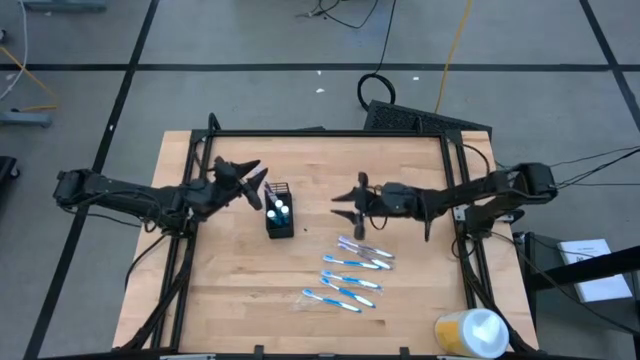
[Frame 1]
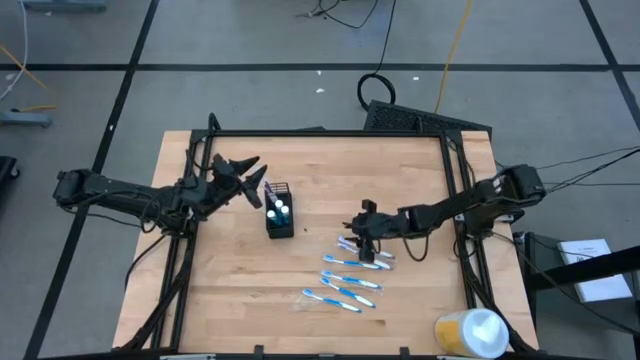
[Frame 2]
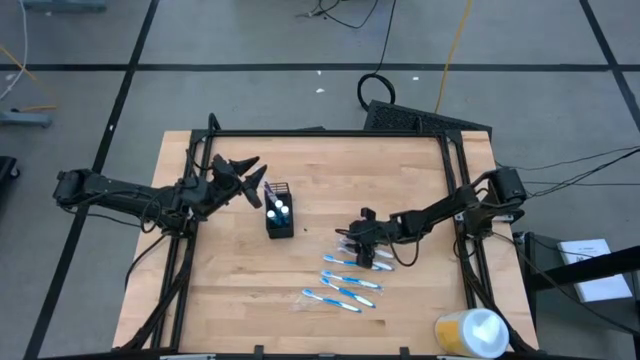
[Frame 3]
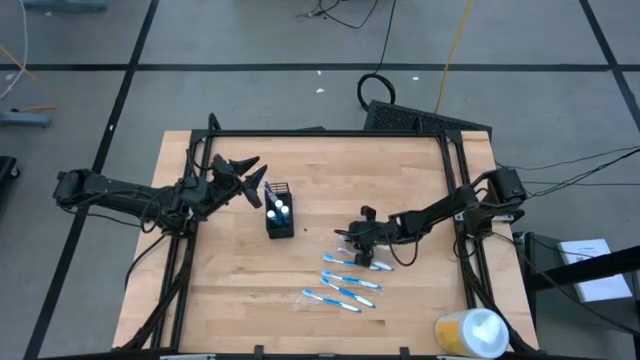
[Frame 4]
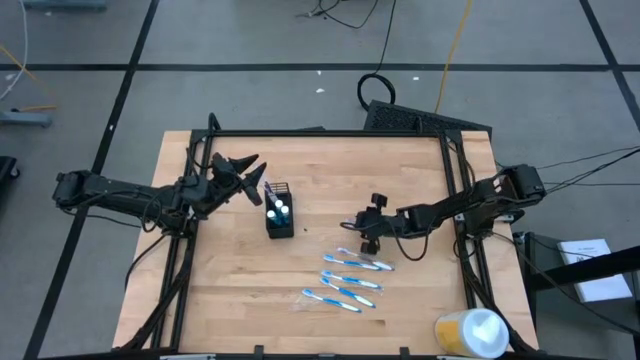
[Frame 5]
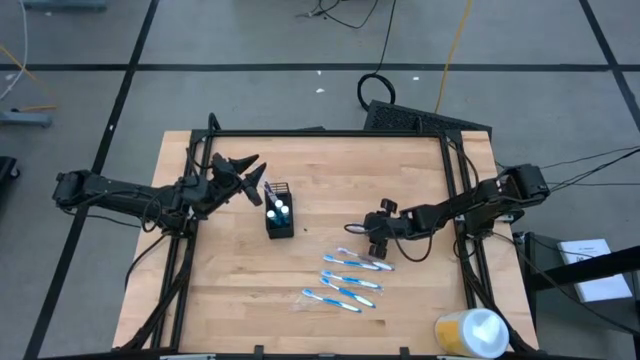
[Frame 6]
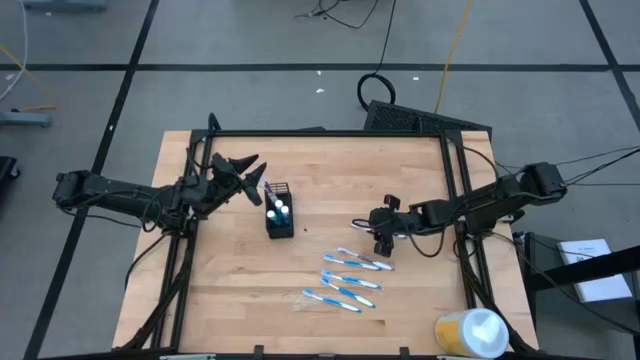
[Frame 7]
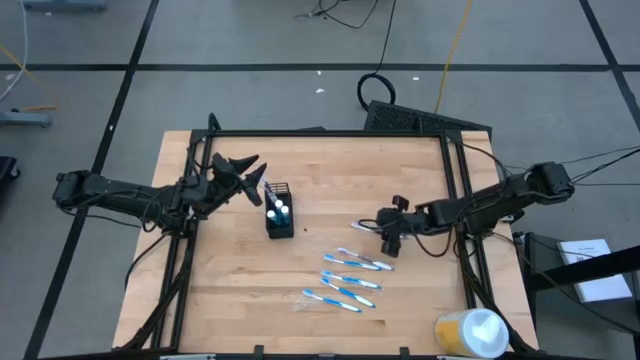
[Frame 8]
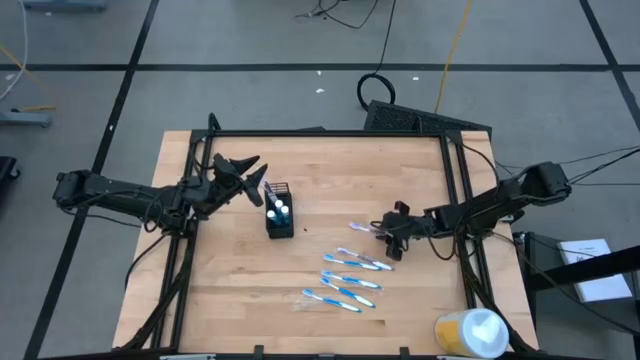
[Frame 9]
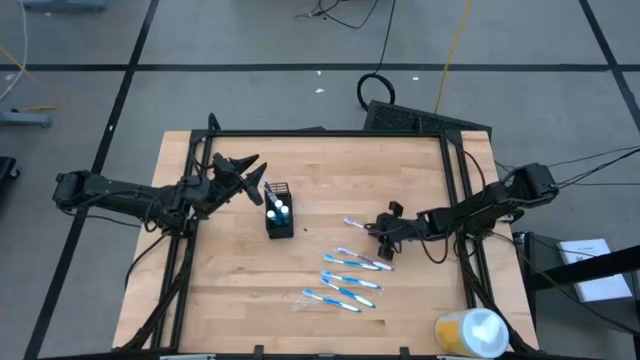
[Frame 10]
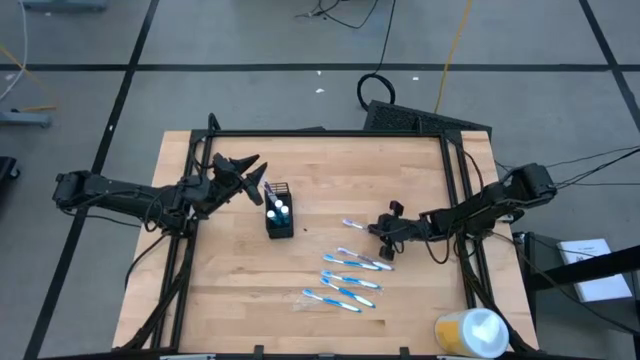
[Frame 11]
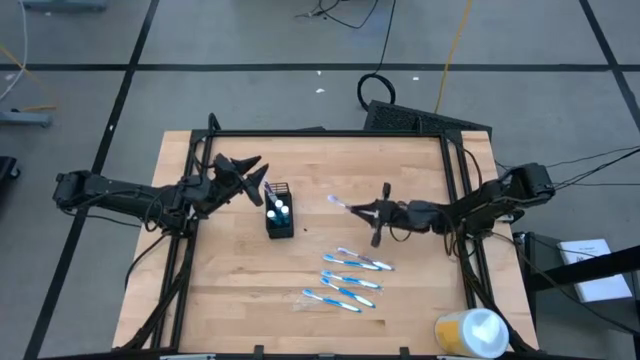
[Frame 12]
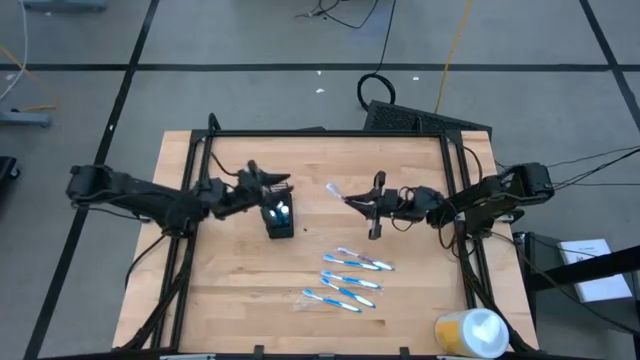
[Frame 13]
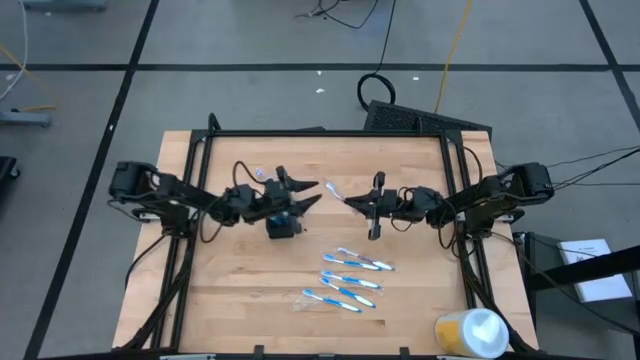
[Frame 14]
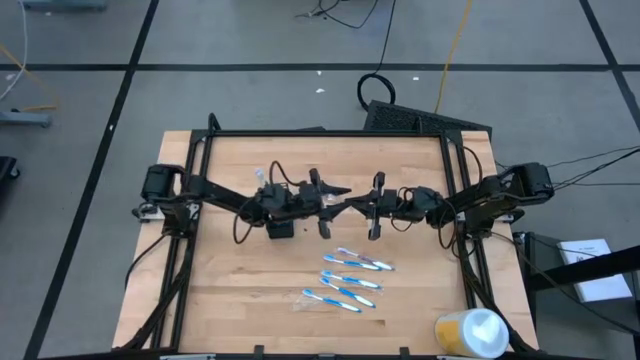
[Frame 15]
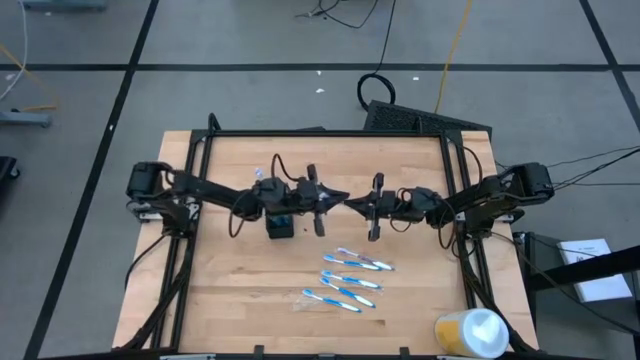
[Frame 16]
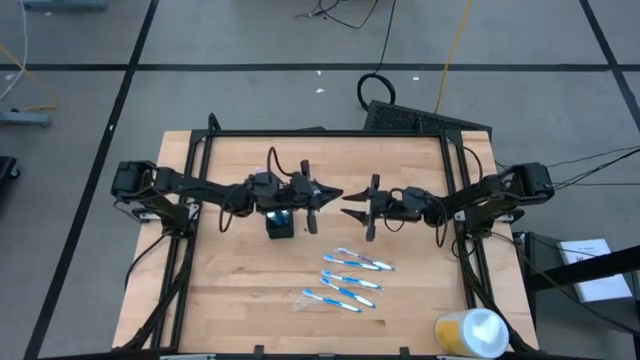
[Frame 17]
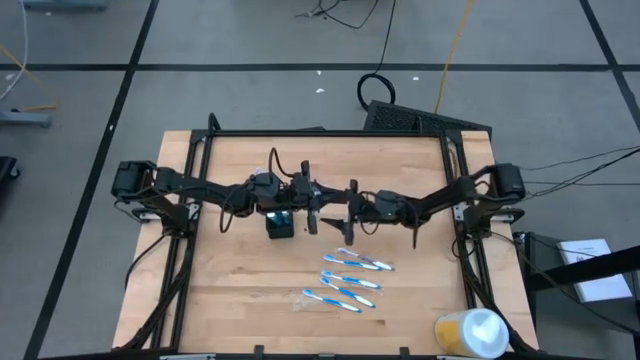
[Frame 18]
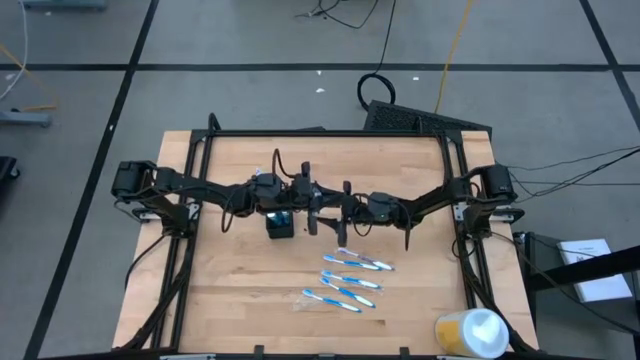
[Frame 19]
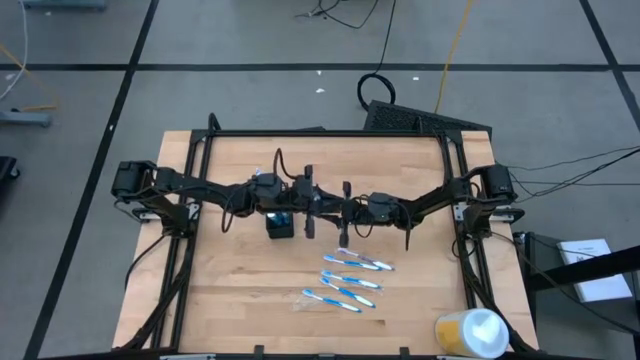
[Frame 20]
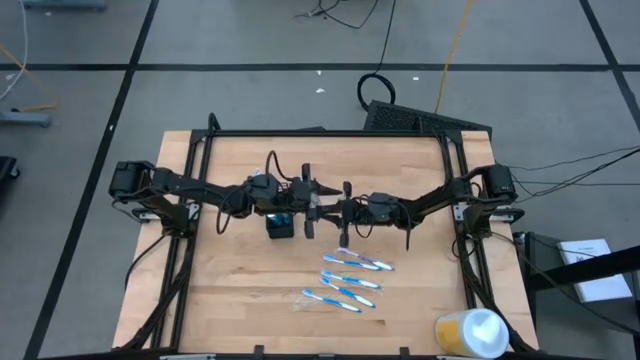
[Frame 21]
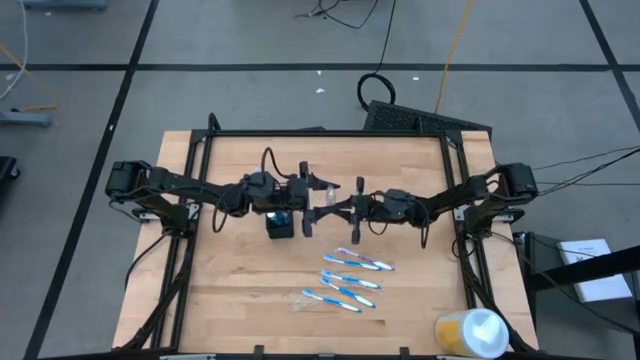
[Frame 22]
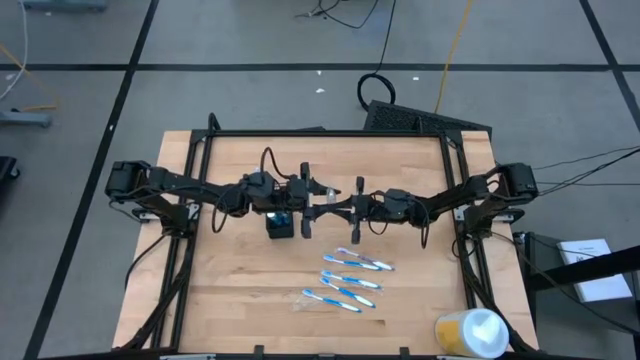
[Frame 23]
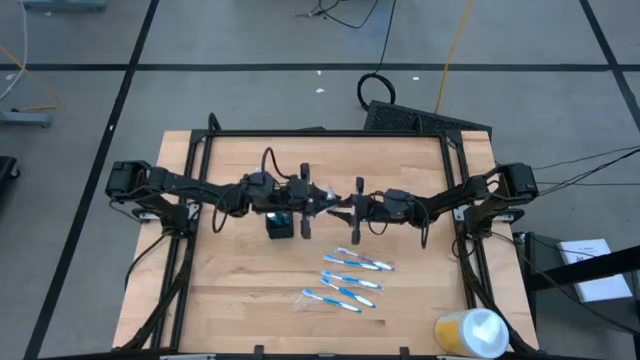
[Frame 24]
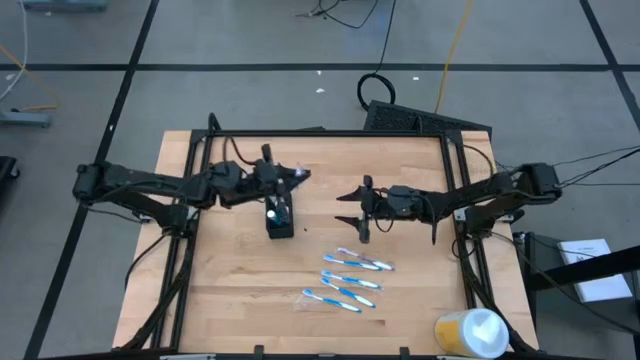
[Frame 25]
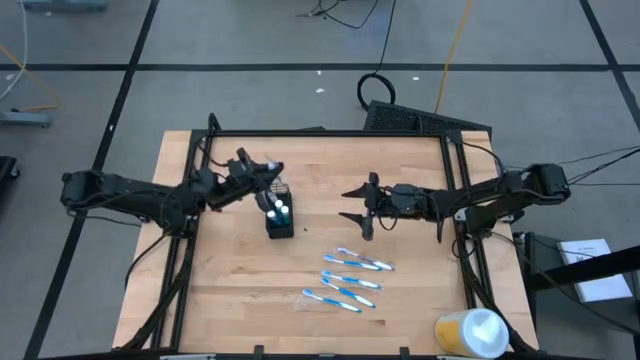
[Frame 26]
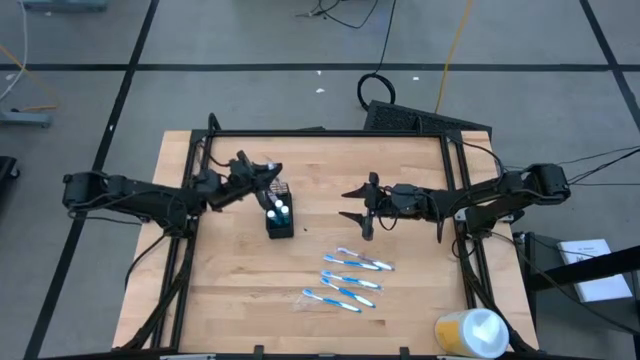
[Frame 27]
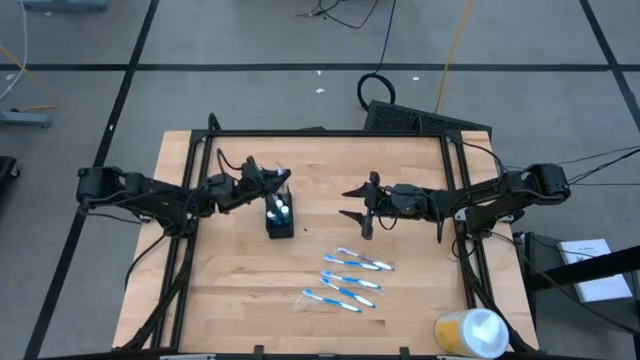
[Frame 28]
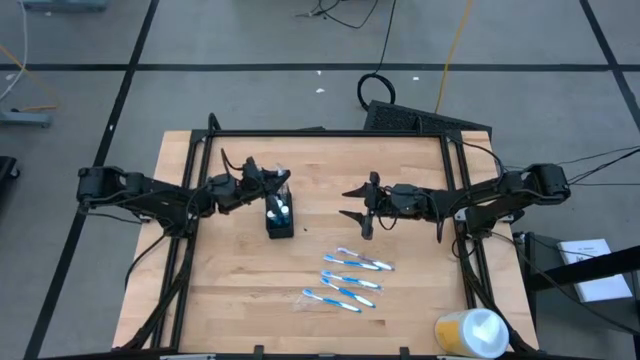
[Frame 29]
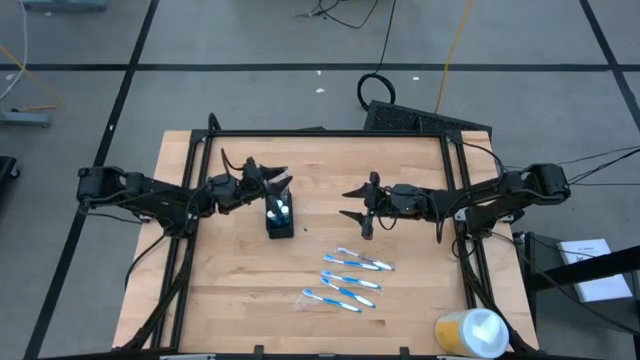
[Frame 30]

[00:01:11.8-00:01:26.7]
Task: Pick & Place toothbrushing station
Put the purple toothbrush into the black organizer

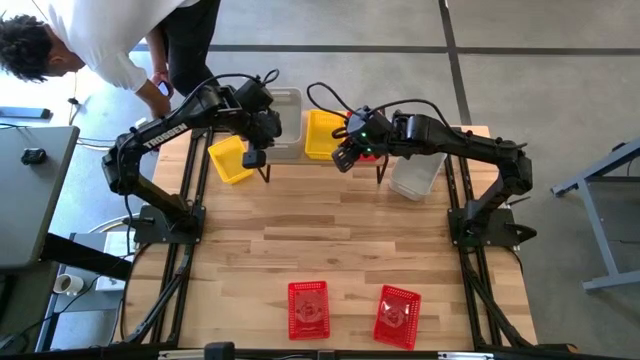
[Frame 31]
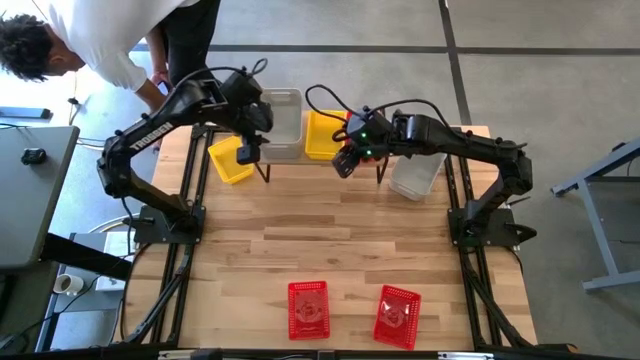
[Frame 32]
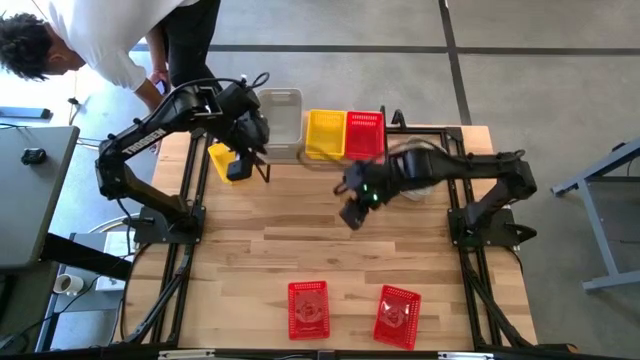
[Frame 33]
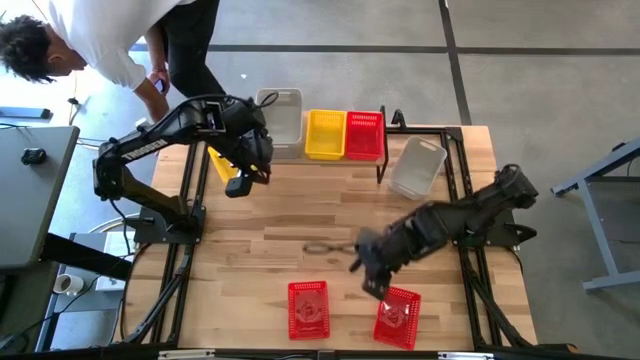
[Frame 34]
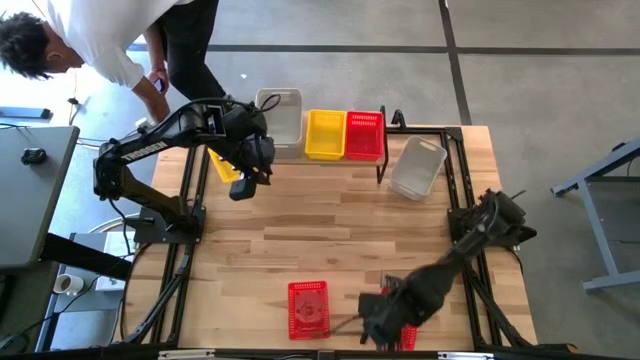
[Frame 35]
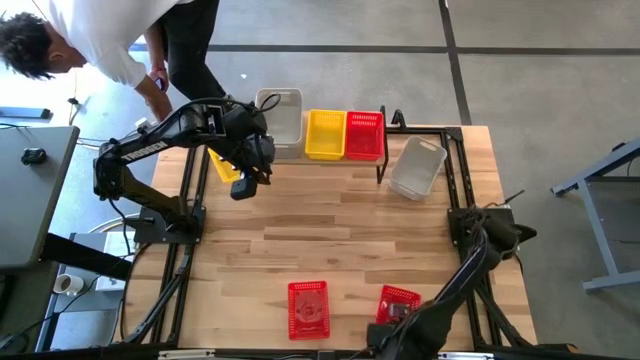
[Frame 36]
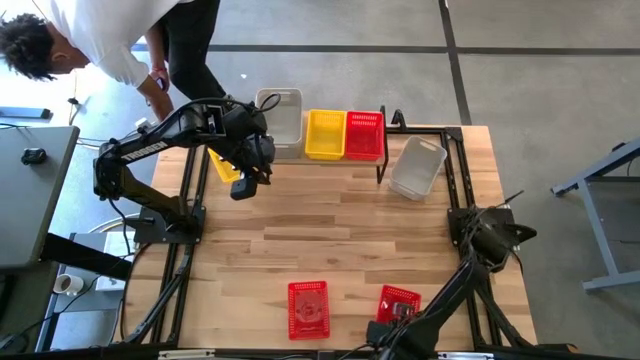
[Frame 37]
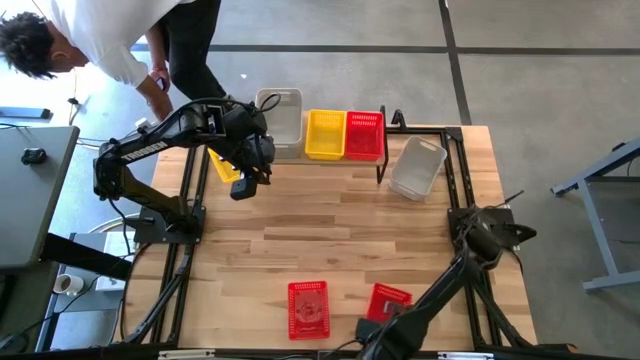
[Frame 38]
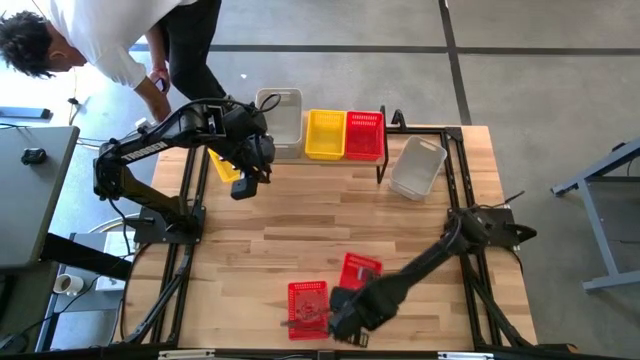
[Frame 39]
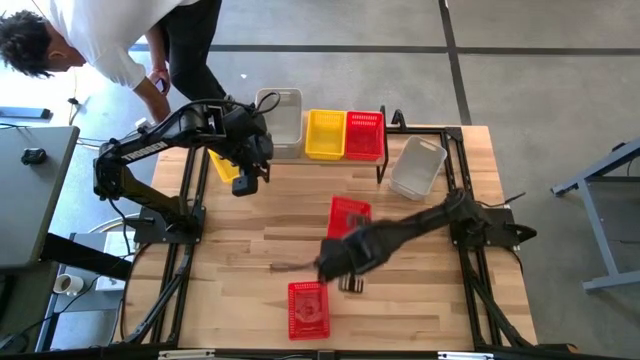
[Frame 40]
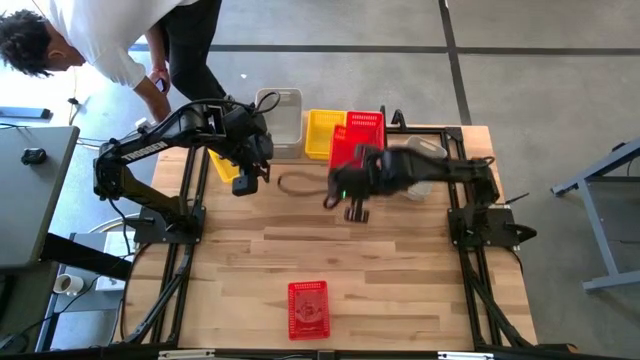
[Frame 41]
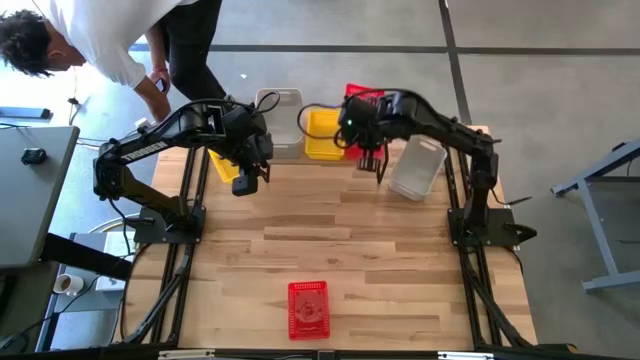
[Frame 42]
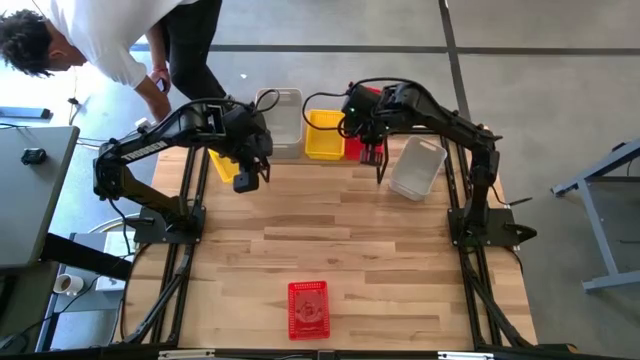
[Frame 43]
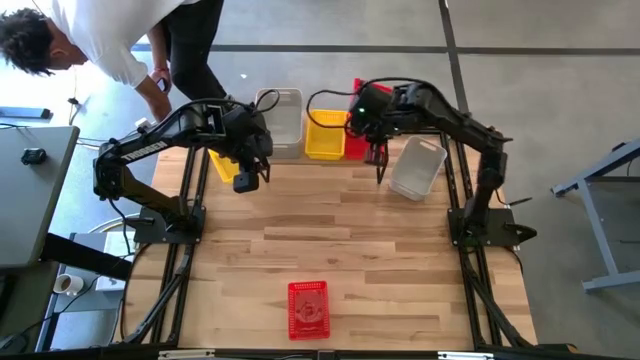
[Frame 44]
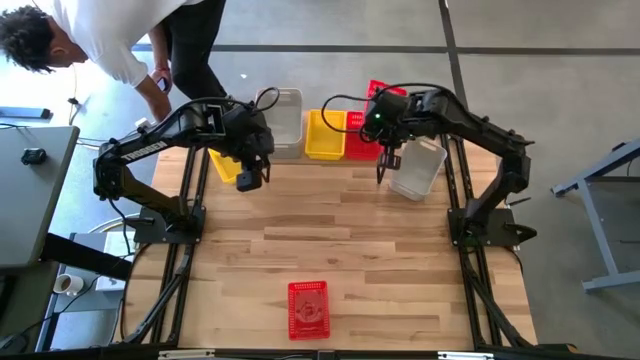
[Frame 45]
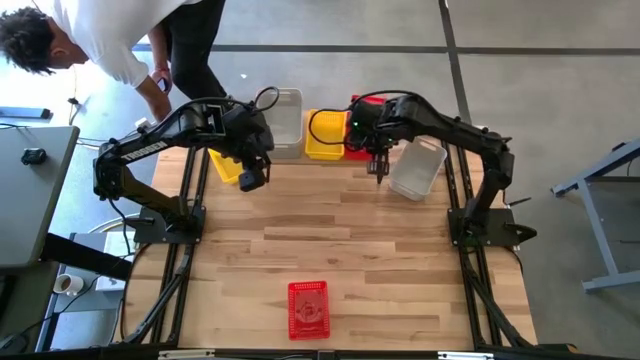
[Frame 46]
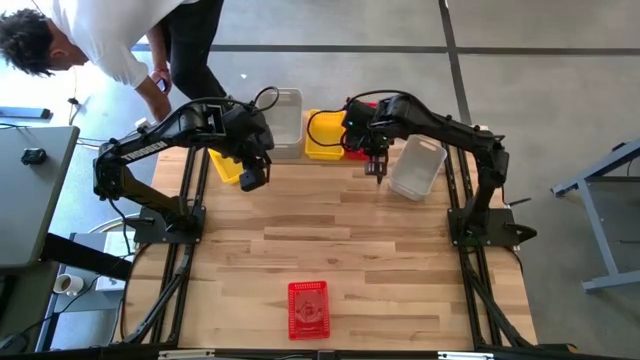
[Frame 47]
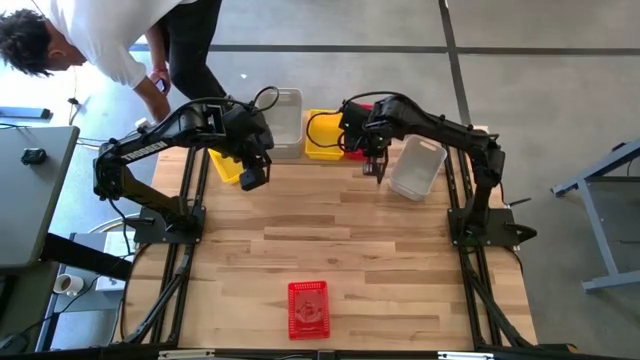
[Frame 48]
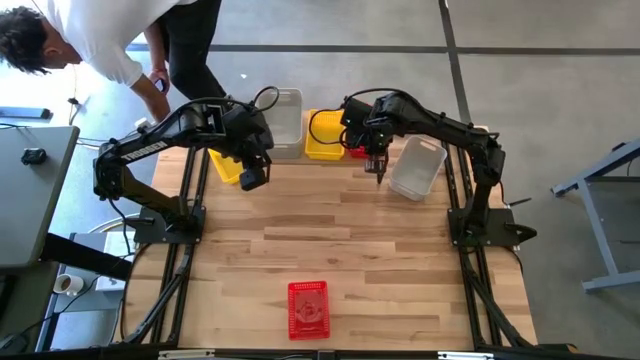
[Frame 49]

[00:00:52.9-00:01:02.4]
Task: Stack baskets on shelf by color
Stack the bottom red bin on top of the other red bin on the shelf
